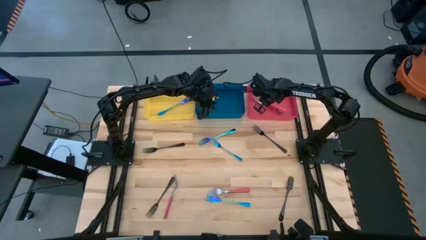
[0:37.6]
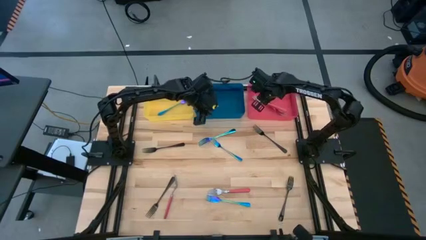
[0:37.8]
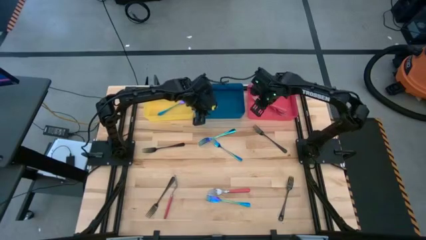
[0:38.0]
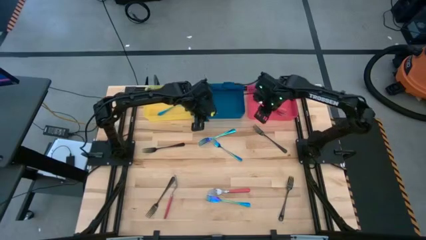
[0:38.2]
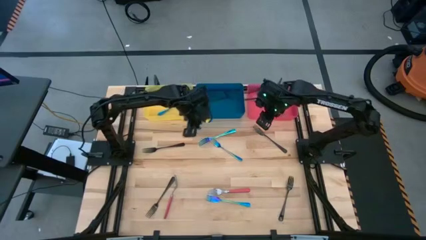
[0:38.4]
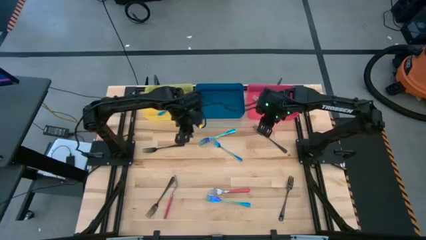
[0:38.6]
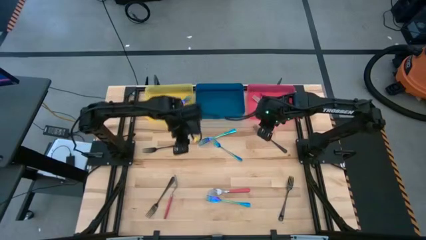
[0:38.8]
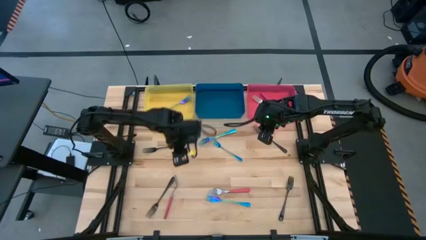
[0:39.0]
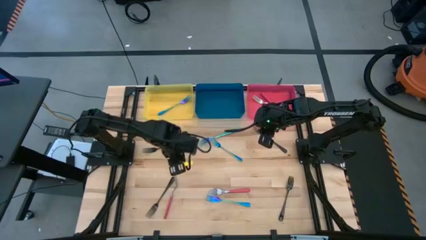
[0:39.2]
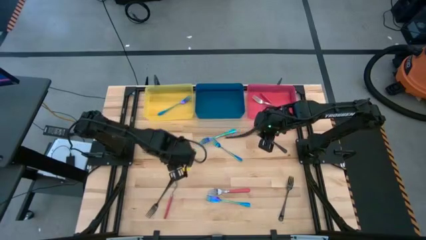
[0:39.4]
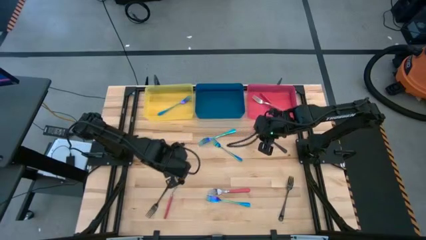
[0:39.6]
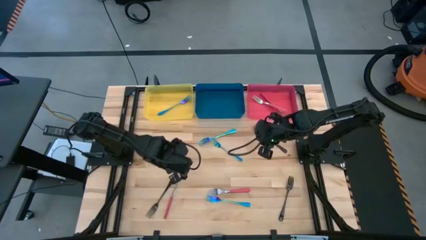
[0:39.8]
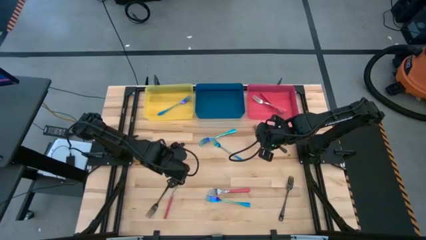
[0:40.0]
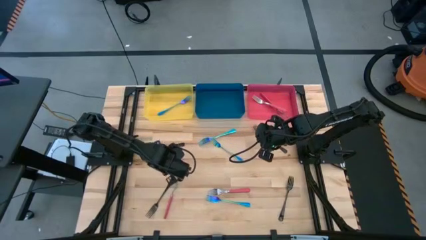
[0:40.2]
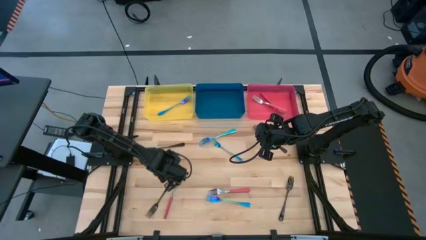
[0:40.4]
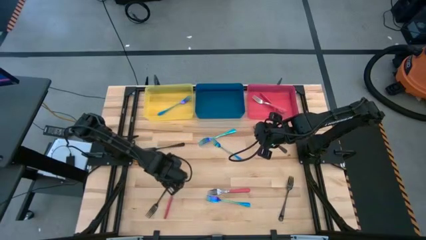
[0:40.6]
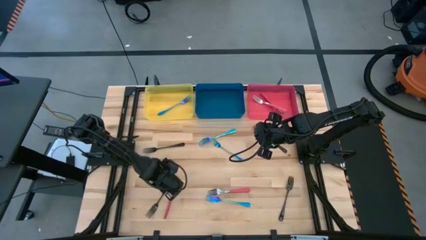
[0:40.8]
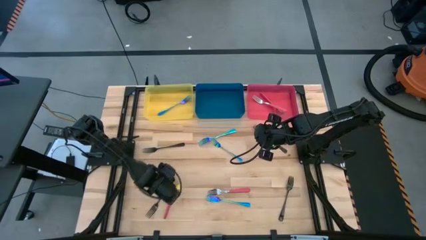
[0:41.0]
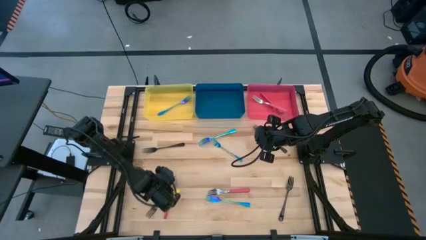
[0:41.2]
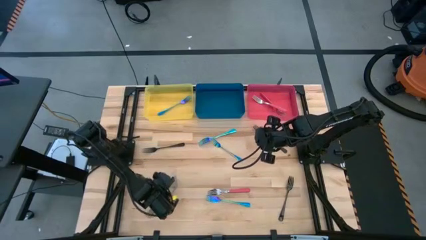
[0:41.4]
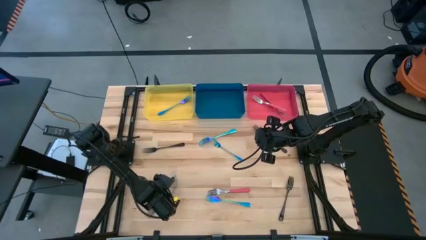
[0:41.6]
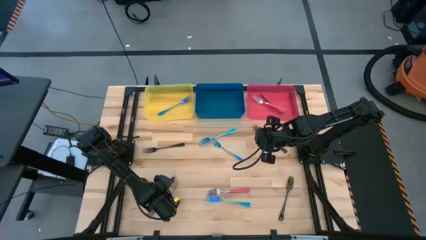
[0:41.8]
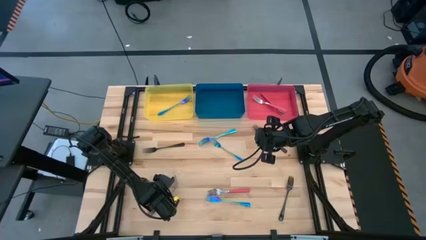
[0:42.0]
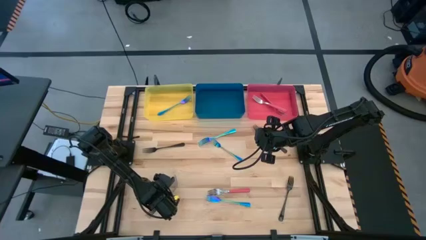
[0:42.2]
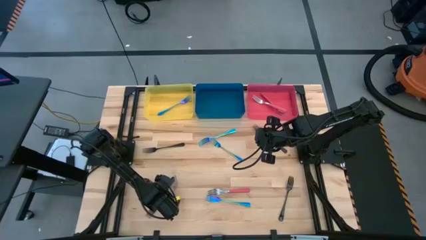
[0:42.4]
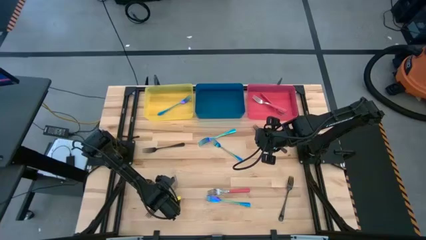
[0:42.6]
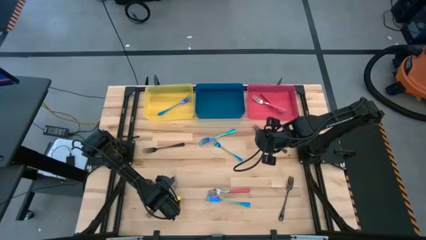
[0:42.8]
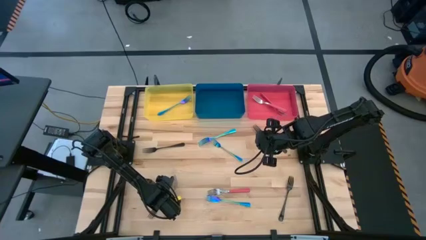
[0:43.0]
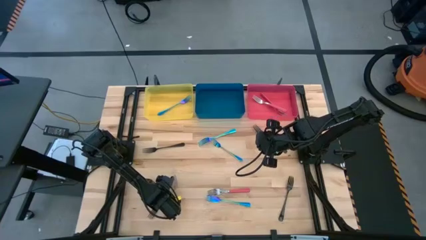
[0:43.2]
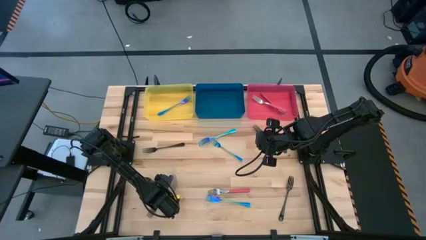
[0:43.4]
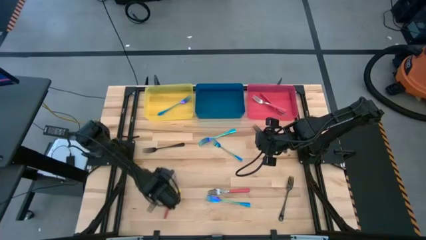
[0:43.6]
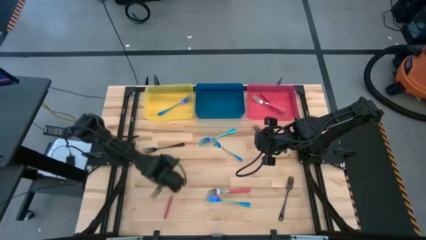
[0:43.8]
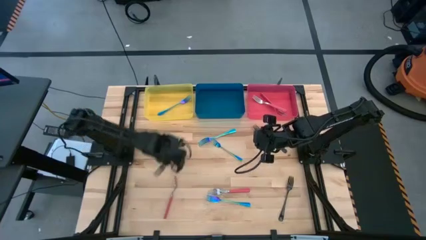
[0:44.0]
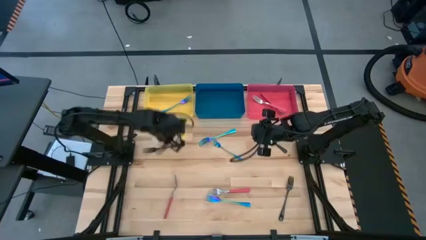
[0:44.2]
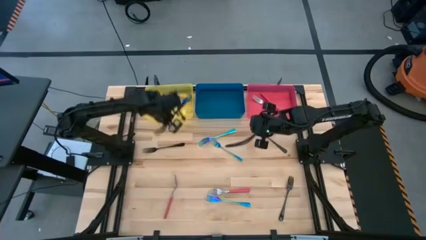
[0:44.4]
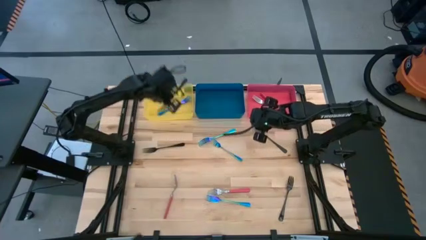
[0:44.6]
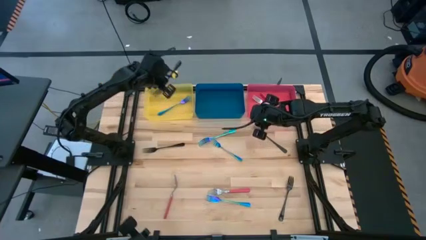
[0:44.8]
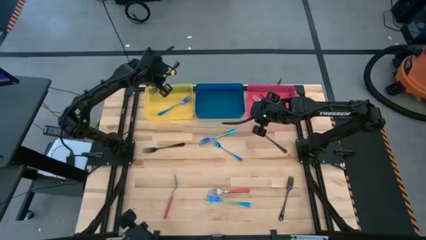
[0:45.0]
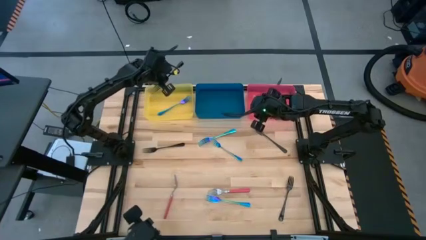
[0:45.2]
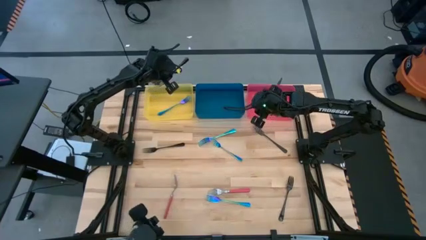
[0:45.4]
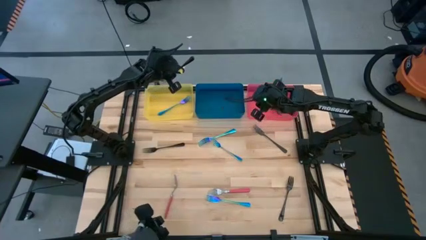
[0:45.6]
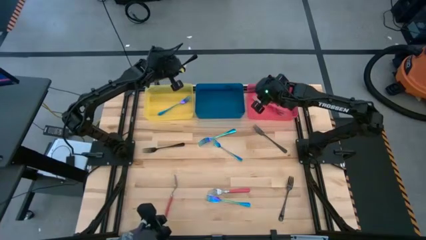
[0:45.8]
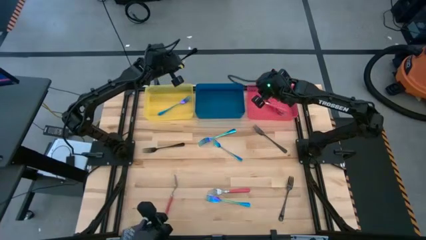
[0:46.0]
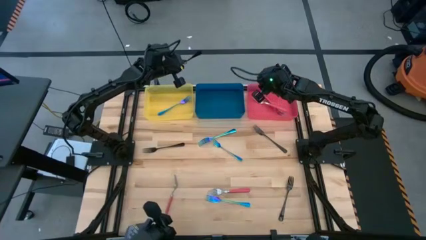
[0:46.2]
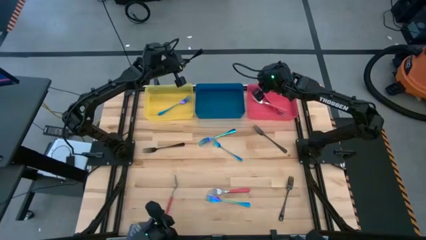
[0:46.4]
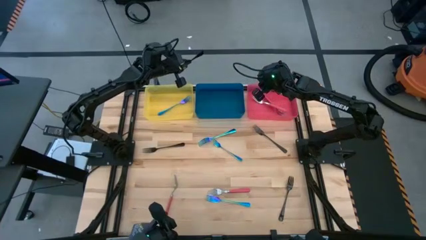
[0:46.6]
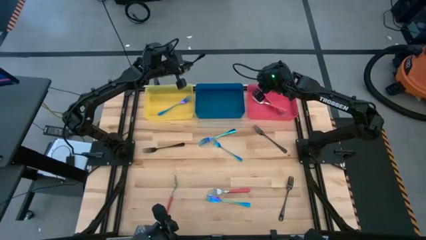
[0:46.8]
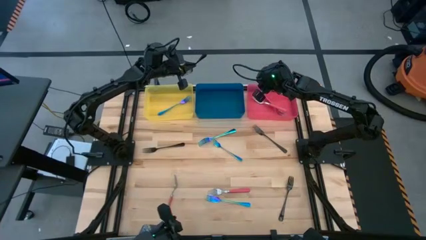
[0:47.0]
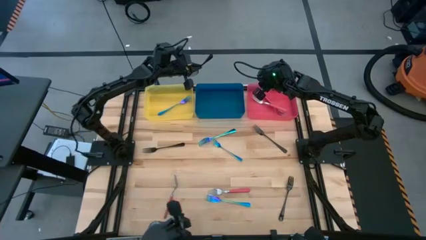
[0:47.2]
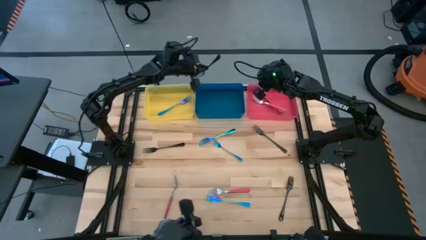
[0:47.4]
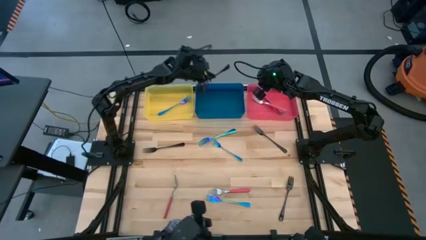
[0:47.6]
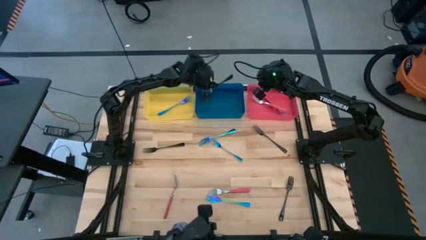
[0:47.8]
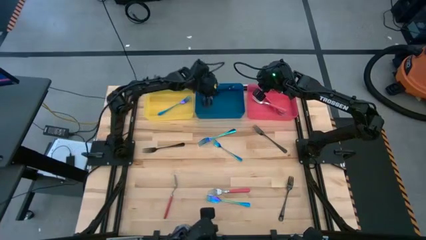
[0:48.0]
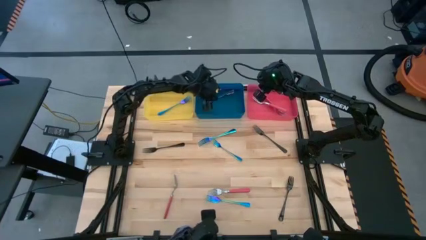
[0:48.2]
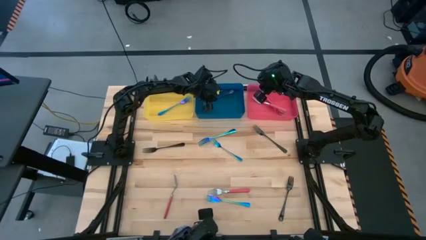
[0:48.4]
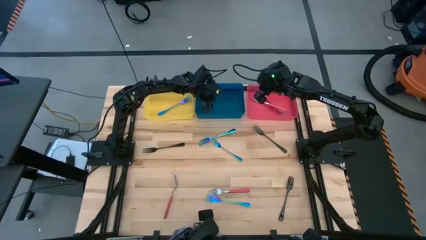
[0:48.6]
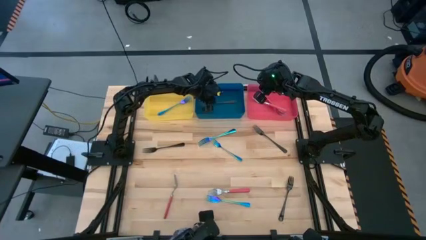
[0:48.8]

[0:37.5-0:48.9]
Task: Sort silverware by color (type)
Put the black fork into the blue bin

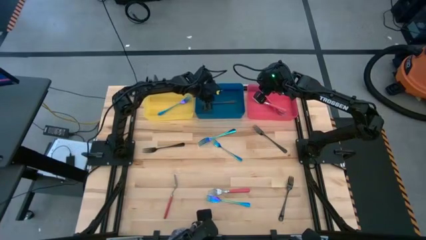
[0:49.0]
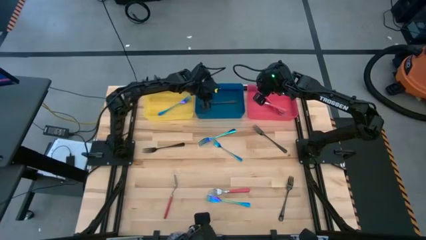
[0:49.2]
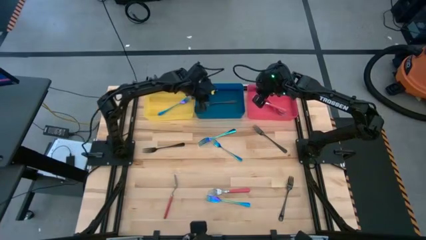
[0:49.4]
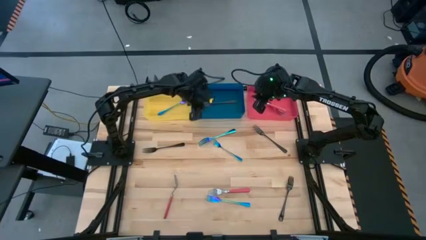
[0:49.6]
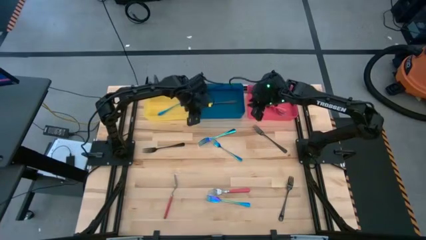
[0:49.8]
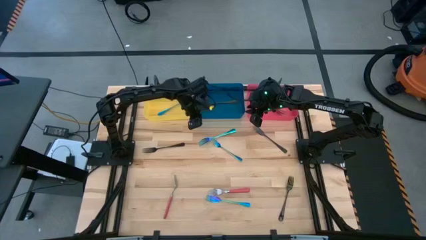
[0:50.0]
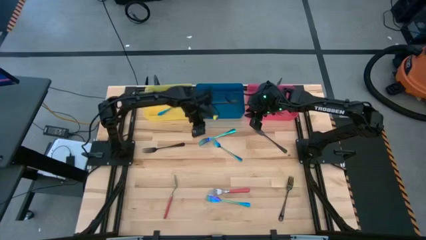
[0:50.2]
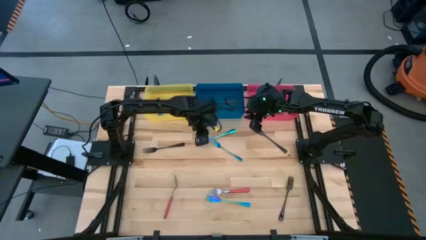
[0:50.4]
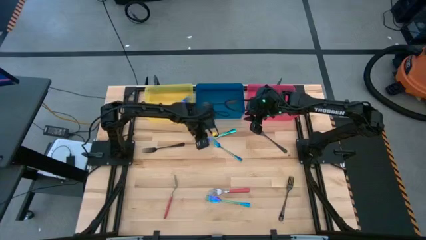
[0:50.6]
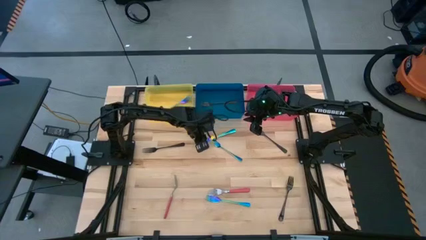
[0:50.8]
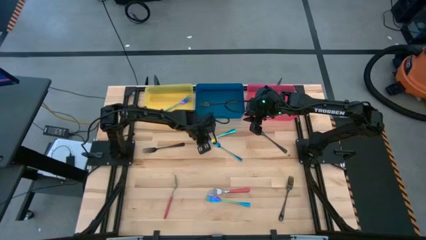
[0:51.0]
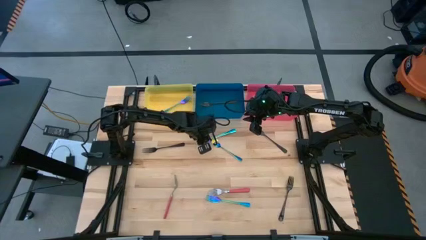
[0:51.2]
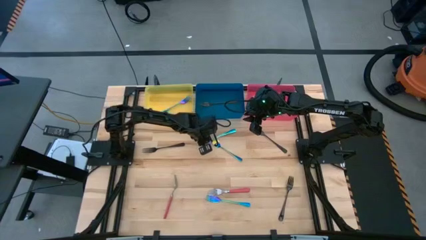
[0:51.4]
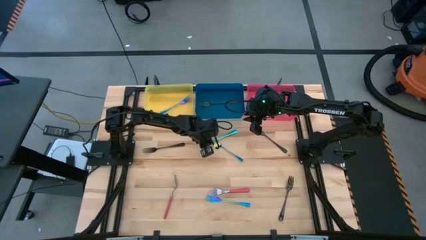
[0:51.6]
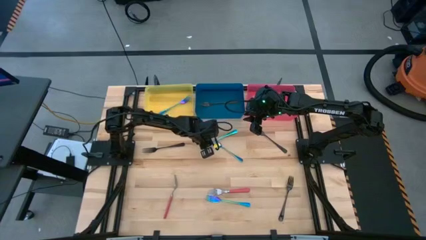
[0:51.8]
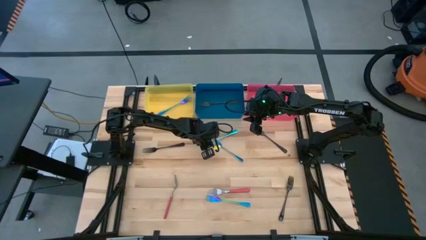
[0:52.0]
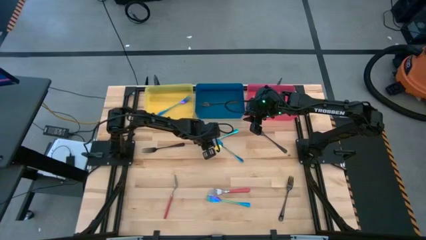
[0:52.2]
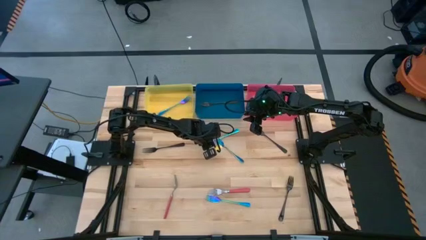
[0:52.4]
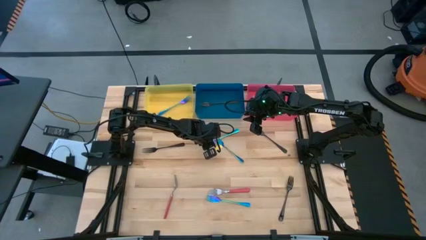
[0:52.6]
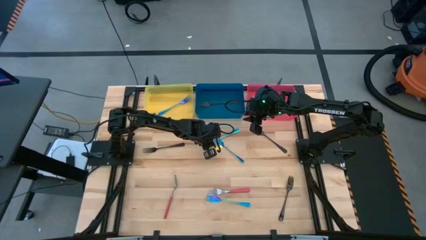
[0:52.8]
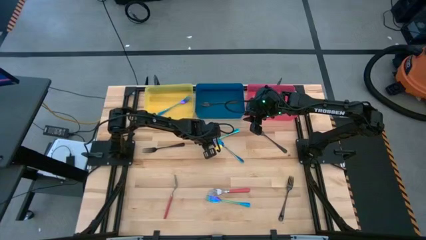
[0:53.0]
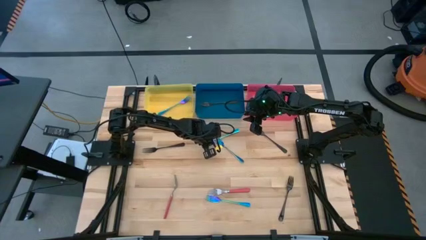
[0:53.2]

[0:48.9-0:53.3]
Put the iridescent fork into the yellow bin

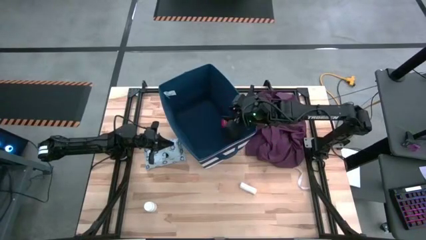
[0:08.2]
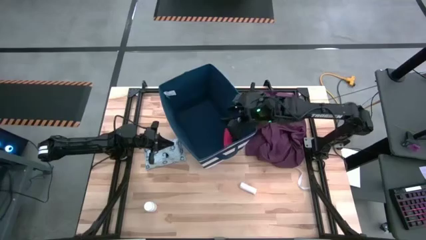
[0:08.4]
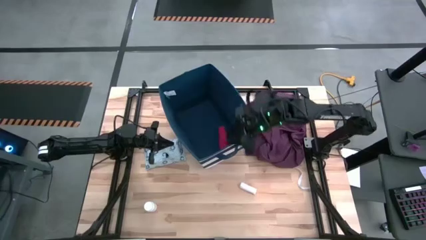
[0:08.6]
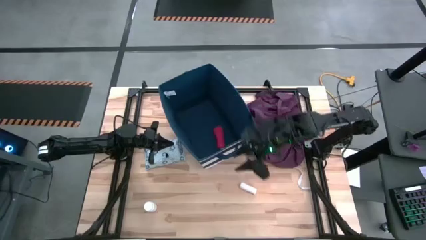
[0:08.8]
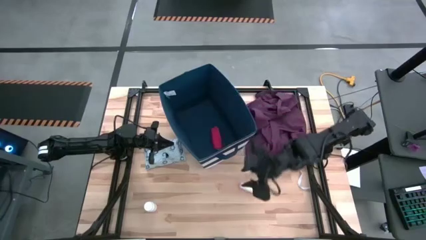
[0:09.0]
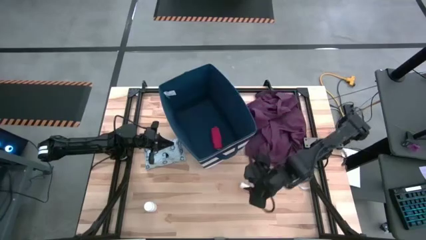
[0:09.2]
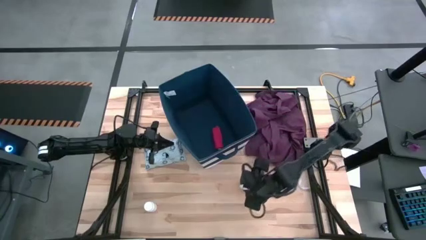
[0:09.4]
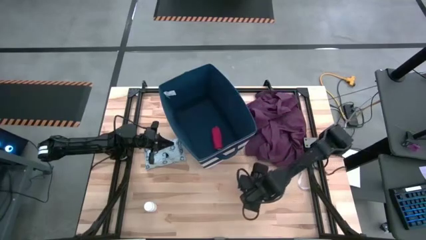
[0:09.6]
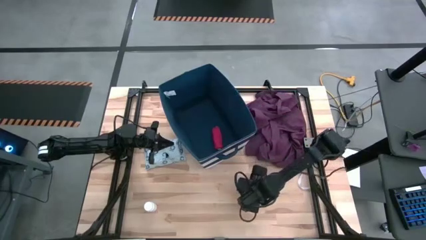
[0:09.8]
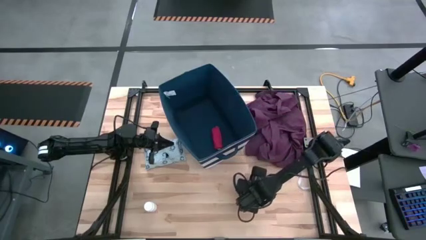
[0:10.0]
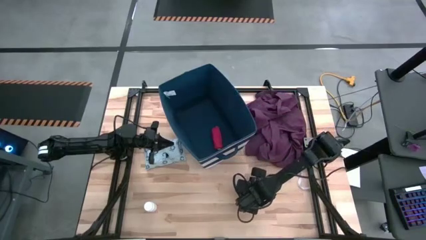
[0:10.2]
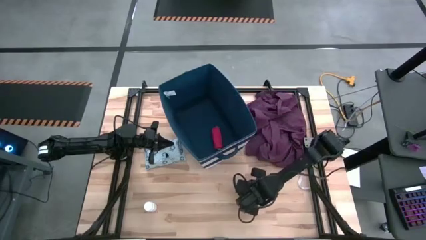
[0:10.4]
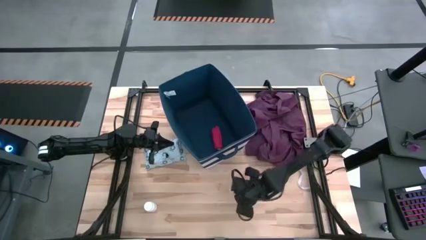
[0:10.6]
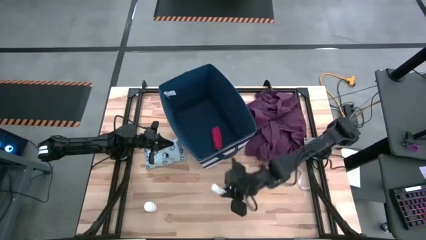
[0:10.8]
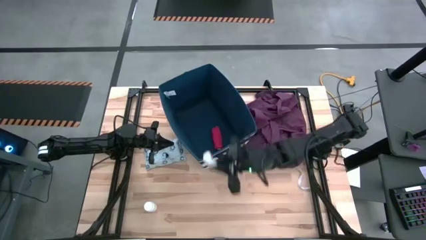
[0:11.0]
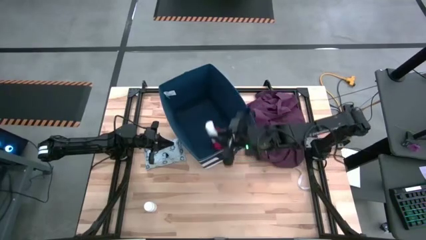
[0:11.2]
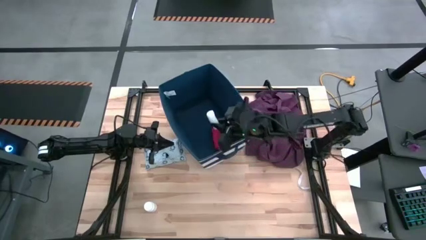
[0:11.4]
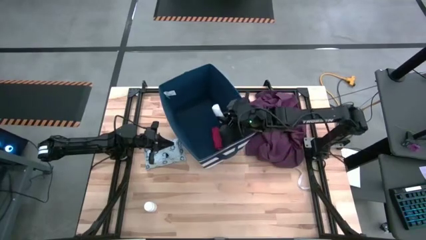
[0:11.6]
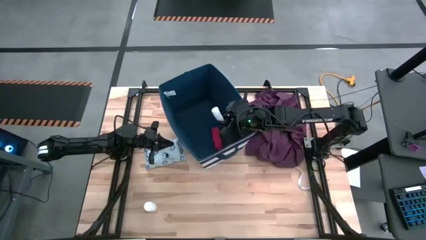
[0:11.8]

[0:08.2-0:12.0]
Task: Pick & place medical supplies in basket/bin
Put the white bandage into the laundry bin
